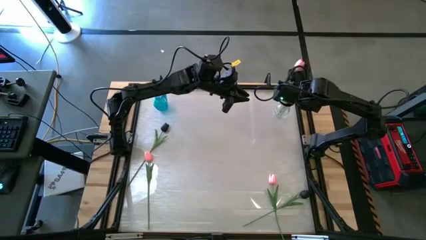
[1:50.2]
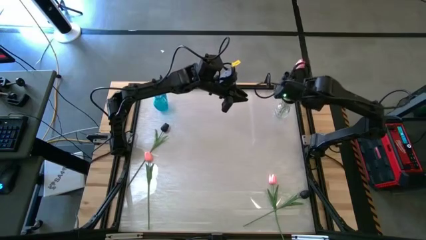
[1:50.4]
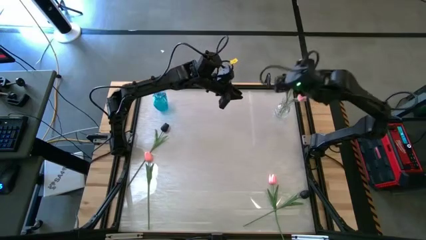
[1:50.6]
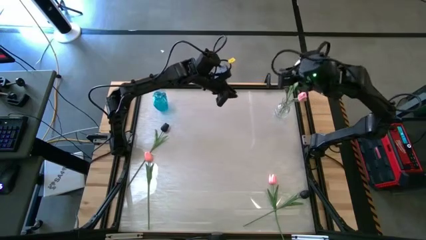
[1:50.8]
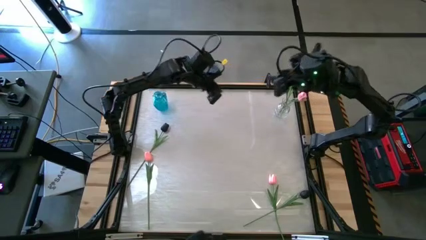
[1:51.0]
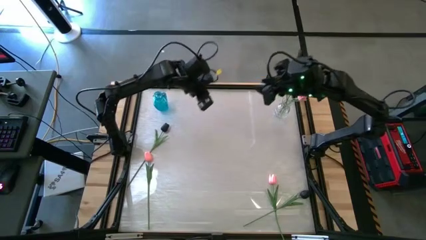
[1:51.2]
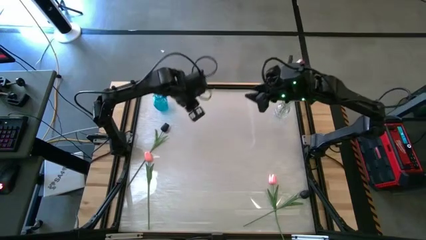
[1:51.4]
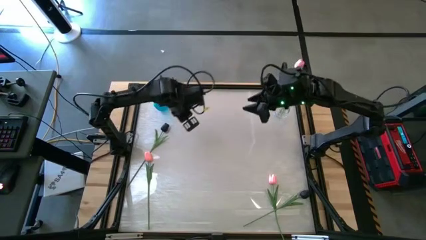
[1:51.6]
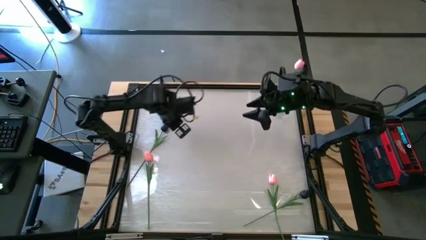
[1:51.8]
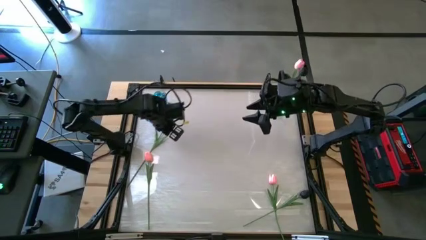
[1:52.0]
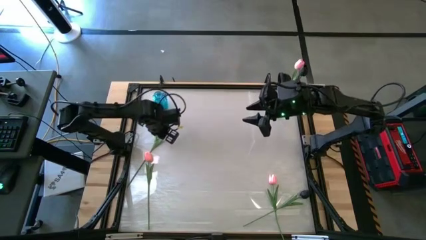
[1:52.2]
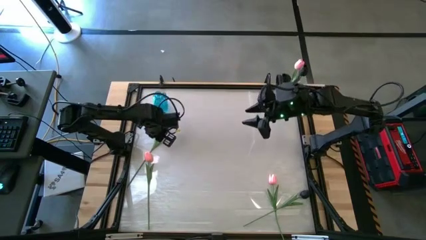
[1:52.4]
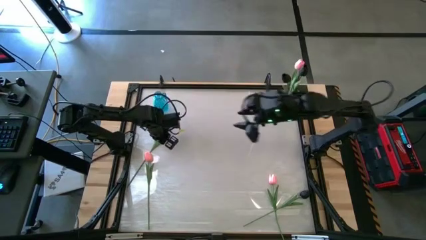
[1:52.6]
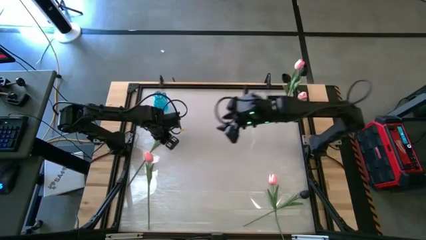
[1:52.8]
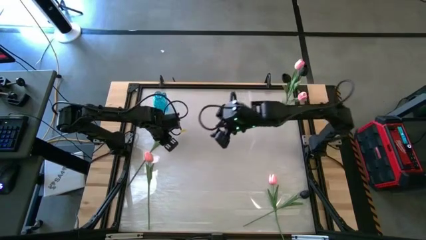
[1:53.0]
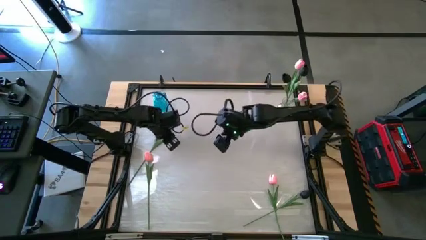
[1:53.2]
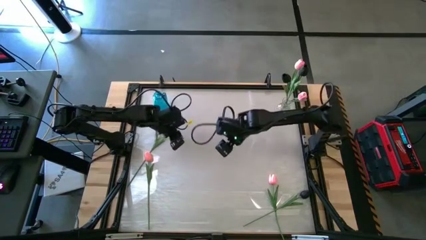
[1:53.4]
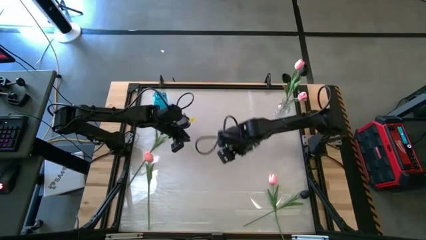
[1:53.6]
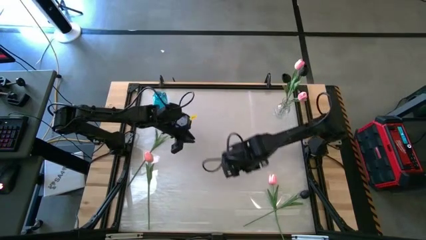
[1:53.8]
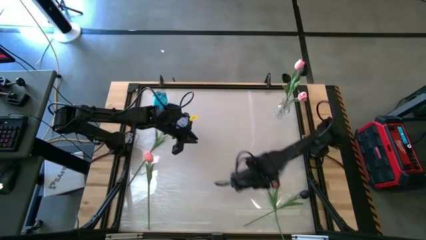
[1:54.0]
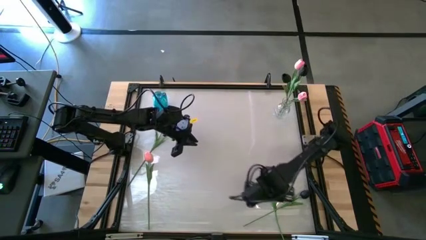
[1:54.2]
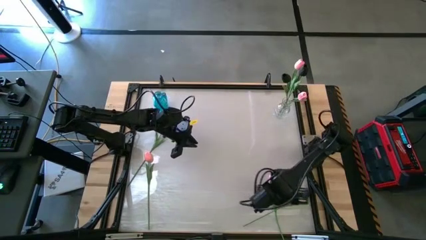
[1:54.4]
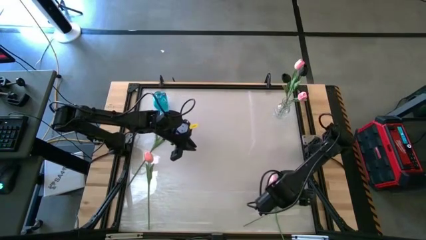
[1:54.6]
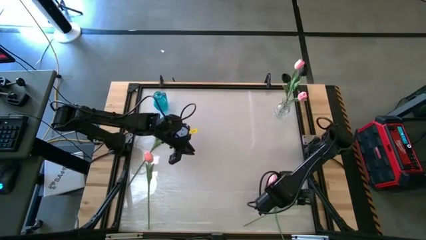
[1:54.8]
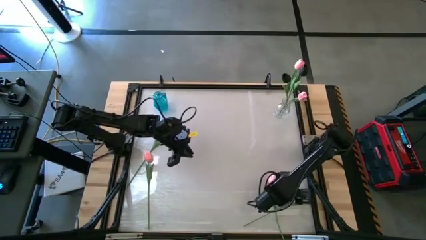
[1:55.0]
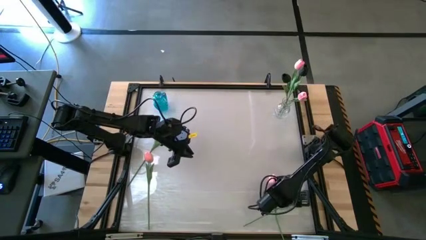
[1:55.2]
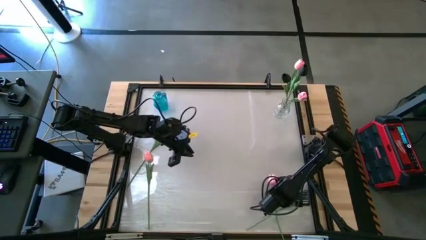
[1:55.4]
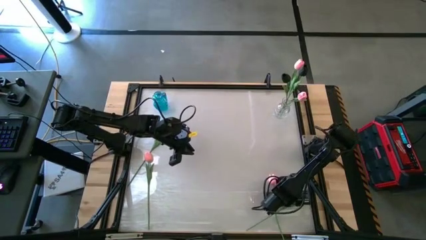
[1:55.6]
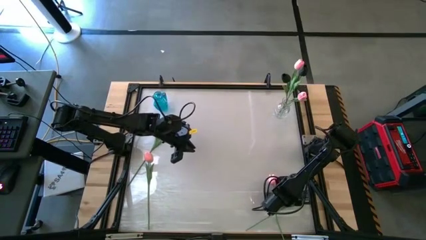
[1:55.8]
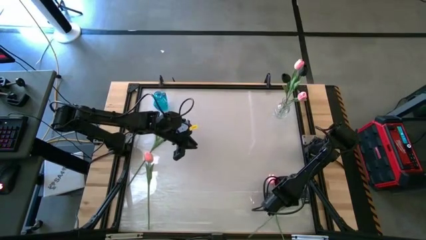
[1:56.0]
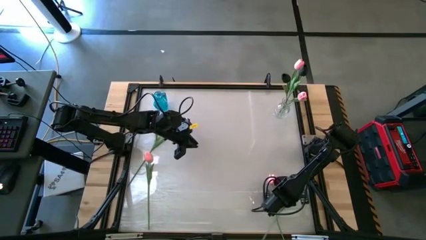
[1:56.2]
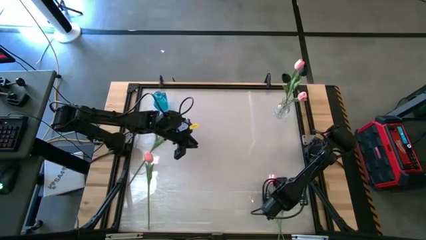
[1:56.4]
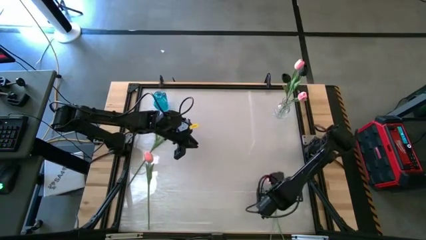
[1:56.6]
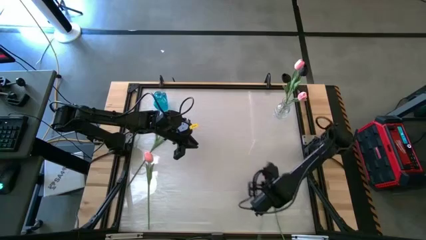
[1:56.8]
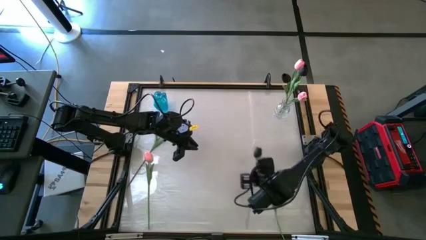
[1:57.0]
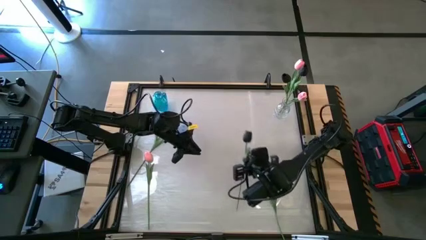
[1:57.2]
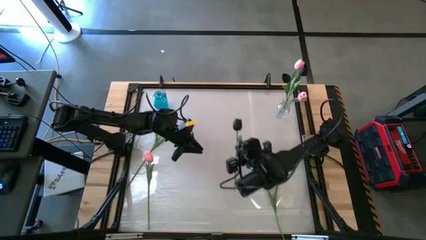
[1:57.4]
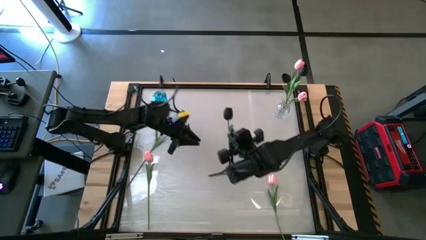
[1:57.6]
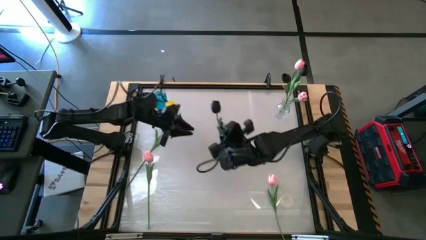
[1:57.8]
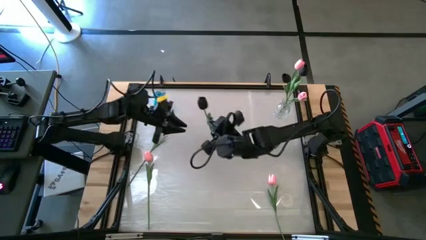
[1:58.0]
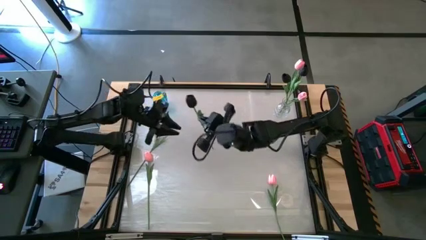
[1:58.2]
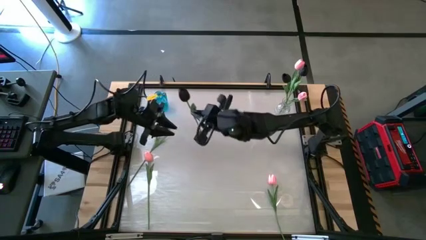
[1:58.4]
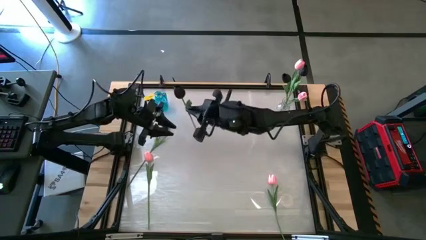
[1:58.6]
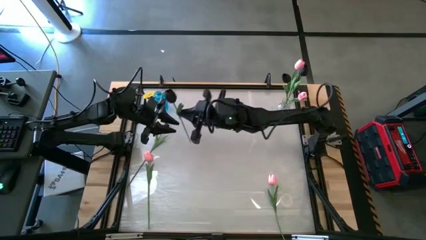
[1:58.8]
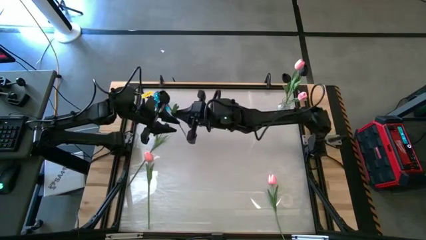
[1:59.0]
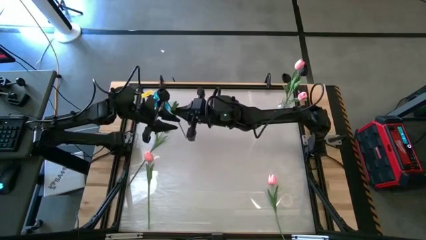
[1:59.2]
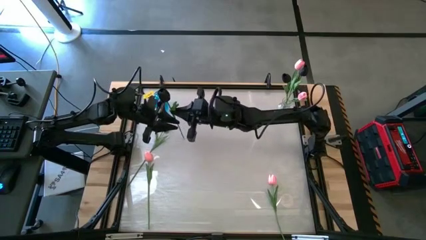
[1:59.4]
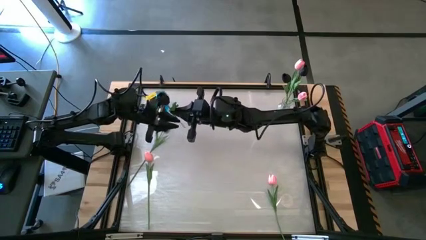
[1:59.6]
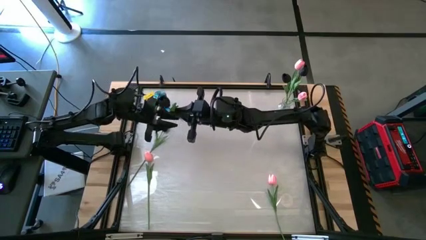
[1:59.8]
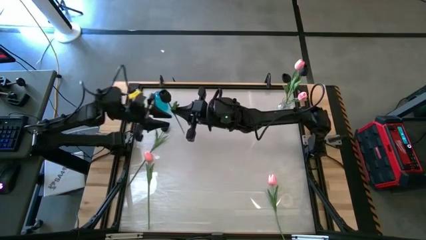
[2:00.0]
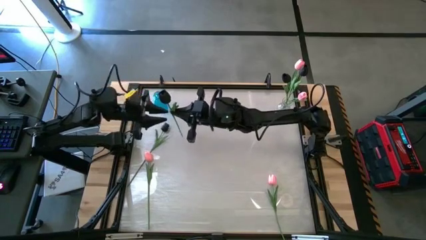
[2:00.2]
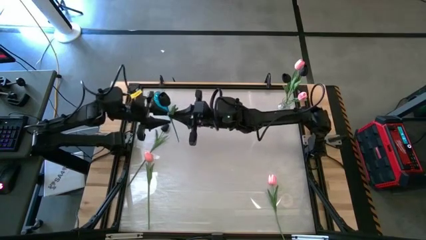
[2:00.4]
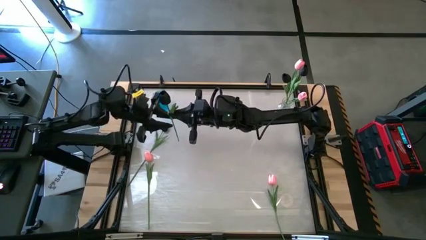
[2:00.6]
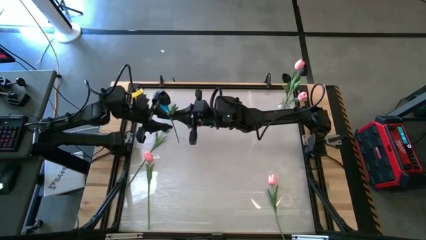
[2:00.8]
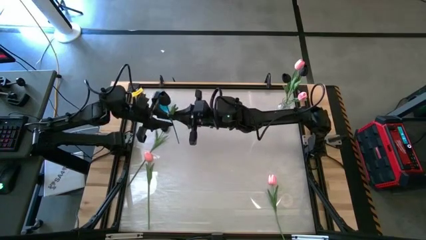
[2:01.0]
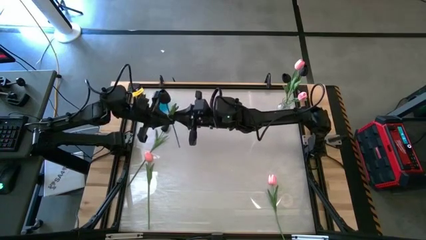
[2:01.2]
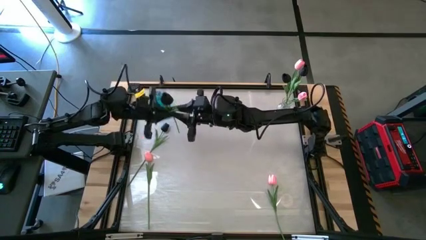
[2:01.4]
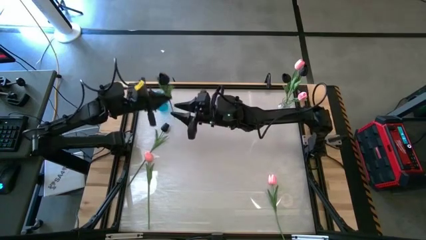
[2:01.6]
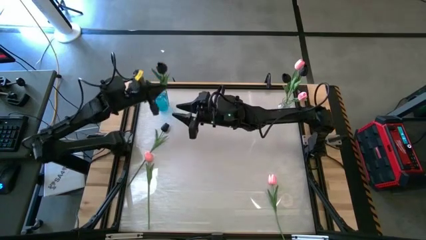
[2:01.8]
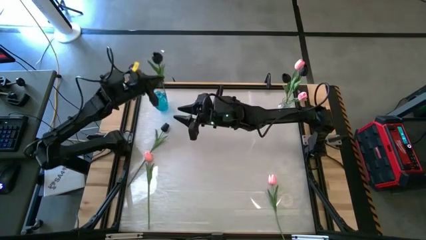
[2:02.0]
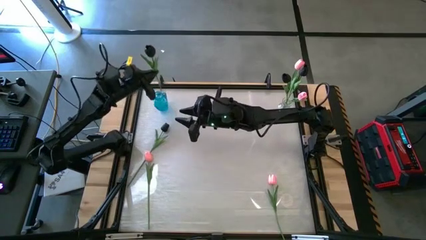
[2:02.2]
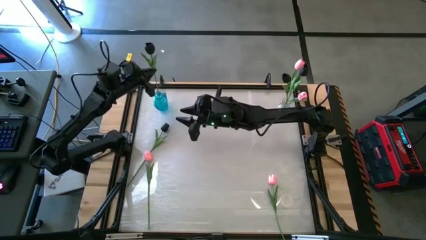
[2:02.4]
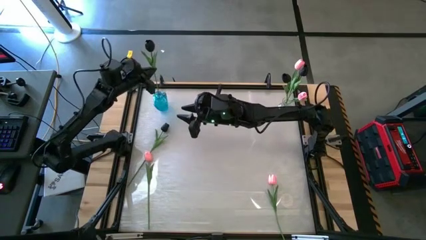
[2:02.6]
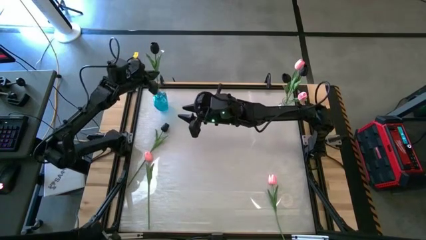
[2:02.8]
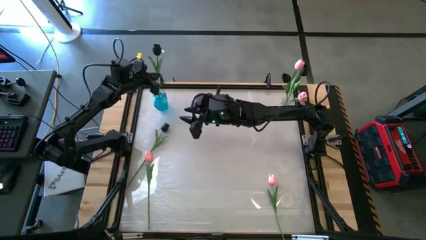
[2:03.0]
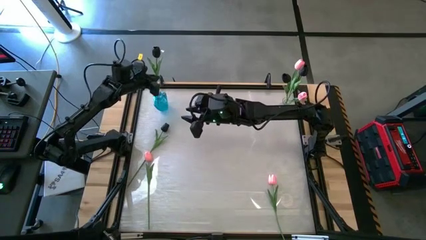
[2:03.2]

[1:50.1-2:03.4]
Task: Sort flowers into vase by color
Put the black flower into the blue vase

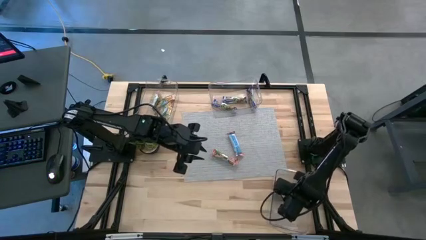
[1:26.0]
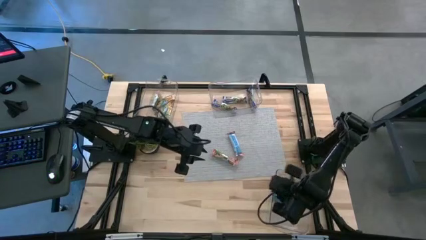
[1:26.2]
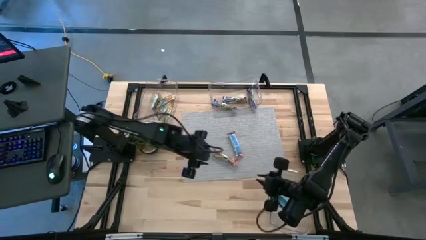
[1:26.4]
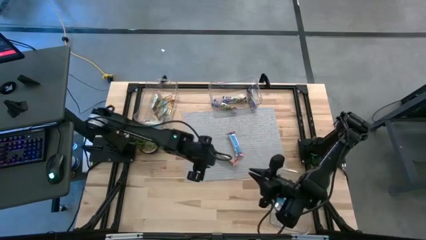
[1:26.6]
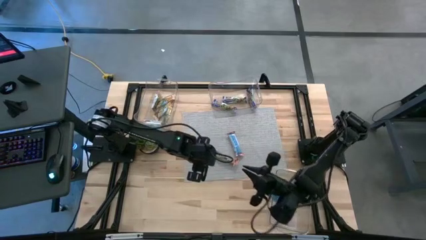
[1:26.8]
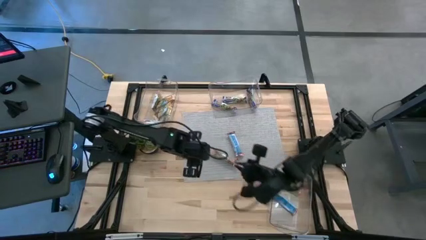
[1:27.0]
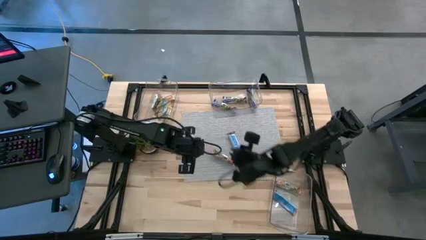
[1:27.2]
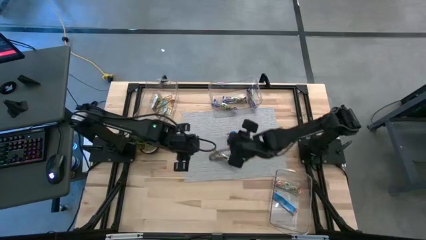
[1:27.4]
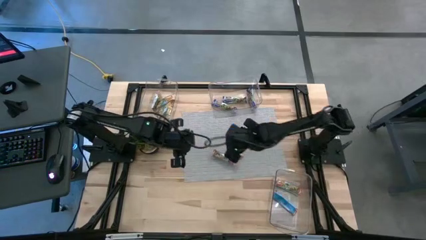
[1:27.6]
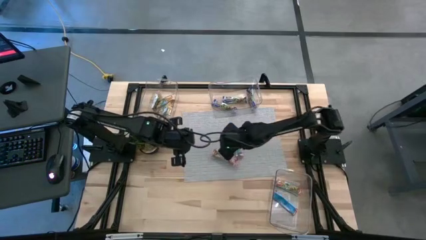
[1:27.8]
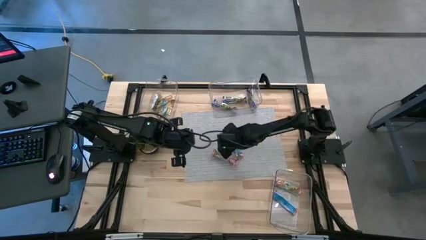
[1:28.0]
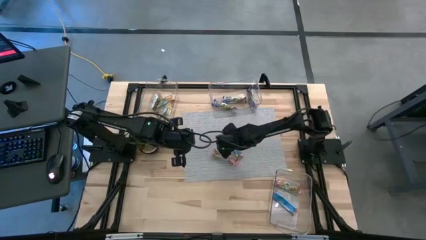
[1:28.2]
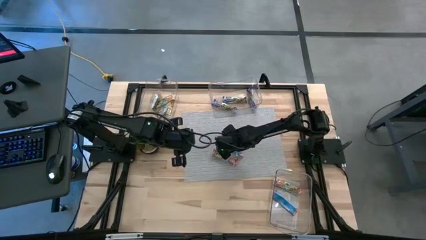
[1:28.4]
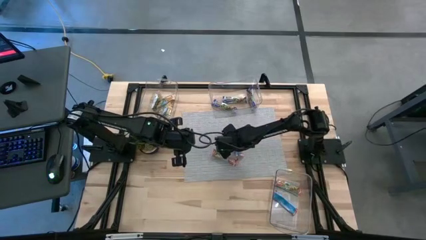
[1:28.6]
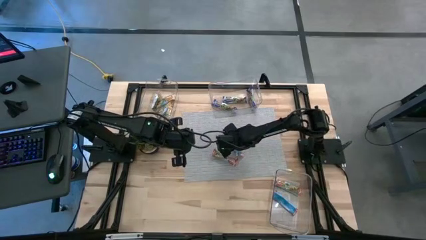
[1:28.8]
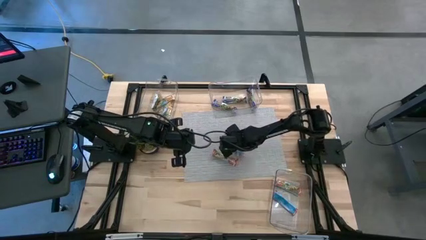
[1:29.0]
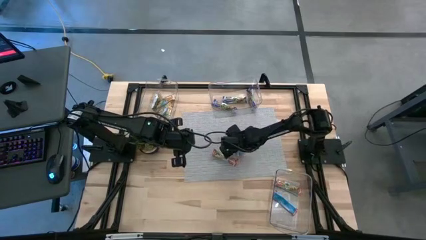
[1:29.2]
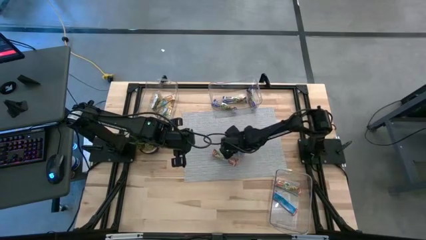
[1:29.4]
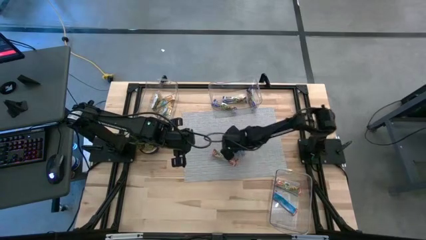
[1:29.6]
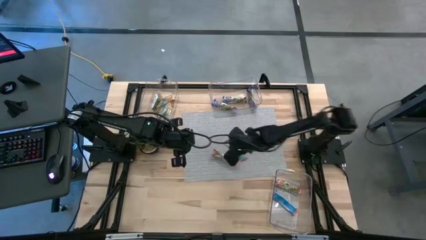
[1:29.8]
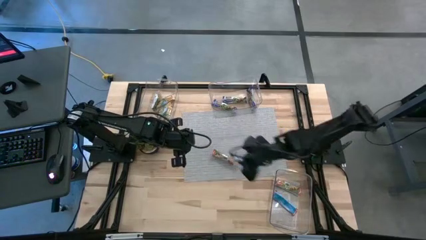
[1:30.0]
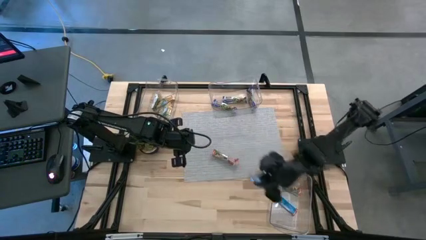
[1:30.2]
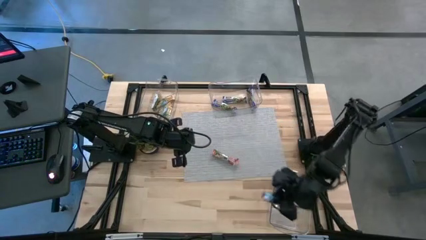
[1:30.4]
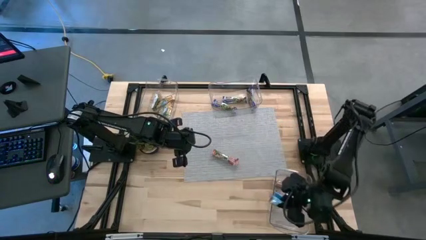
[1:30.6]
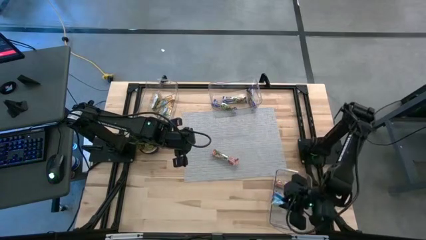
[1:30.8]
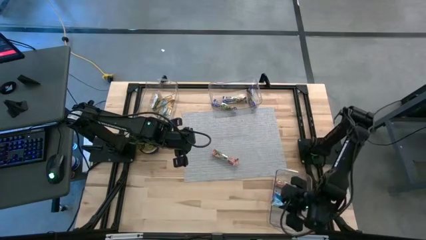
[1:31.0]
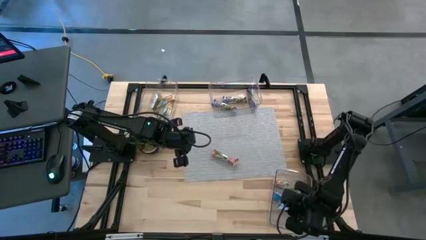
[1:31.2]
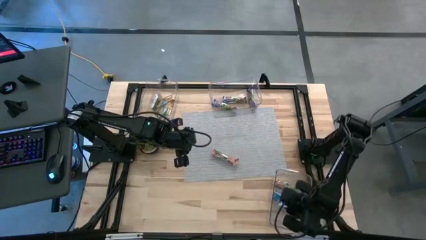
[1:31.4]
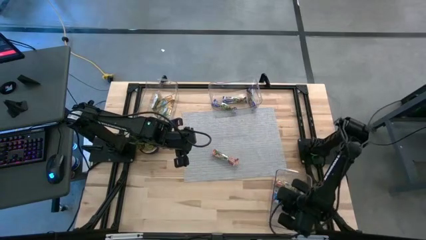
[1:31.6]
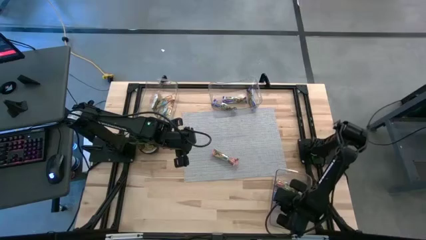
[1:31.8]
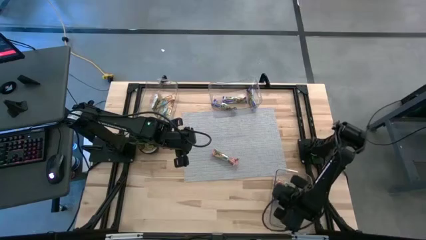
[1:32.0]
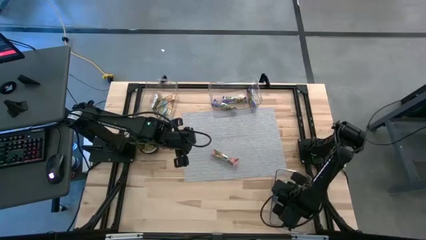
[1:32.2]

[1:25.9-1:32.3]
Task: Pick and place Granola Bars by type
Put the red granola bar into the bottom transparent bin
